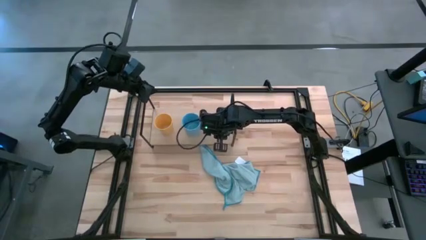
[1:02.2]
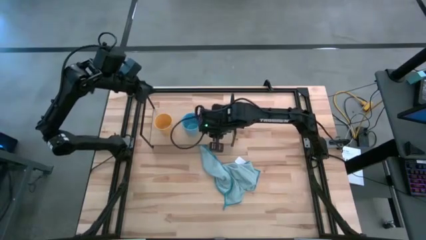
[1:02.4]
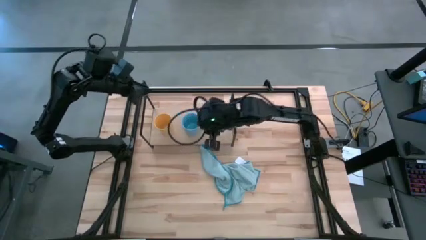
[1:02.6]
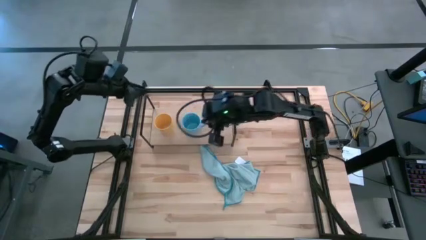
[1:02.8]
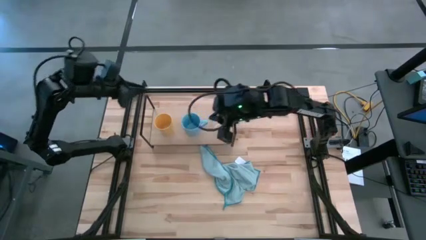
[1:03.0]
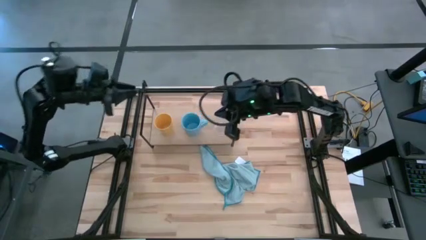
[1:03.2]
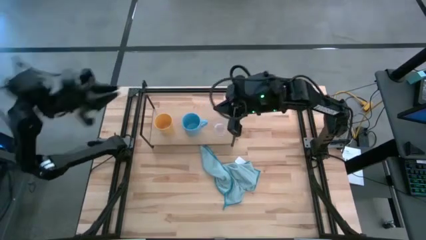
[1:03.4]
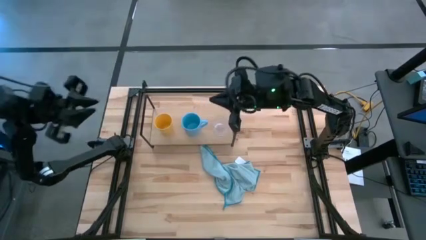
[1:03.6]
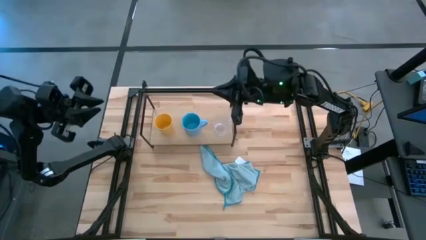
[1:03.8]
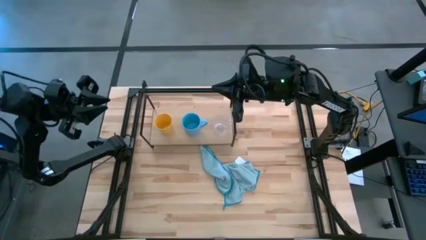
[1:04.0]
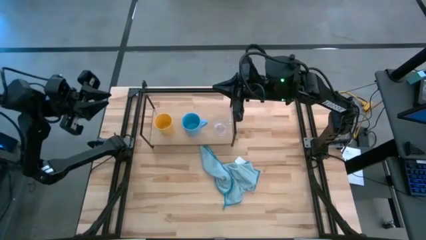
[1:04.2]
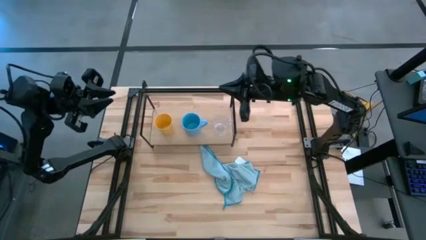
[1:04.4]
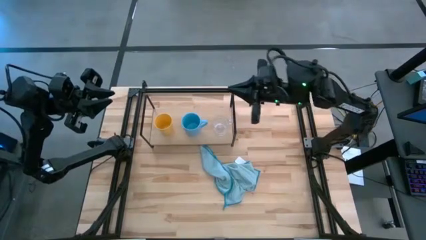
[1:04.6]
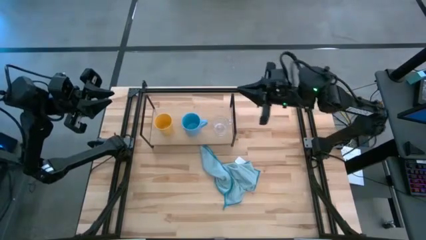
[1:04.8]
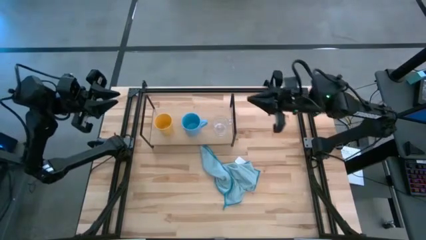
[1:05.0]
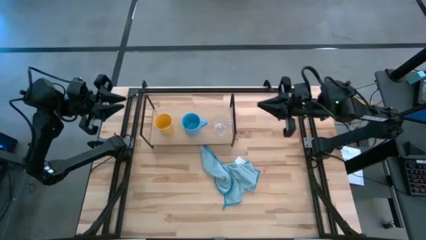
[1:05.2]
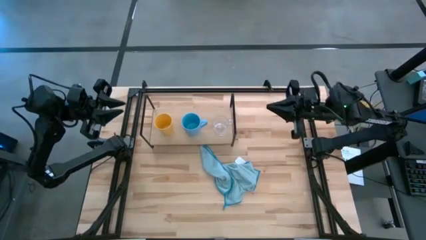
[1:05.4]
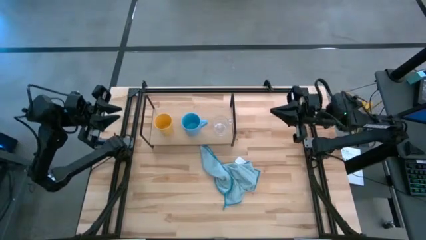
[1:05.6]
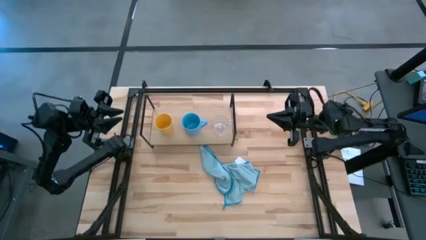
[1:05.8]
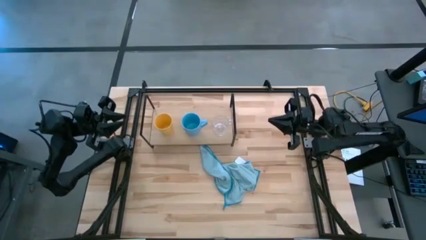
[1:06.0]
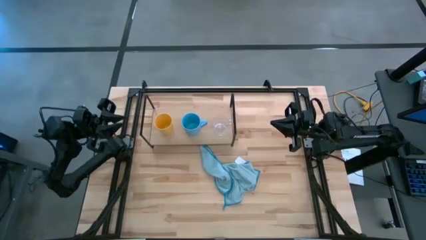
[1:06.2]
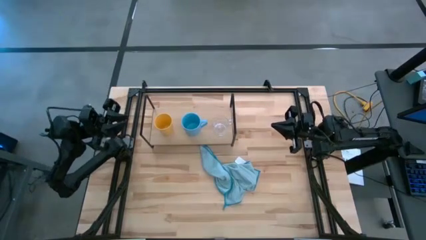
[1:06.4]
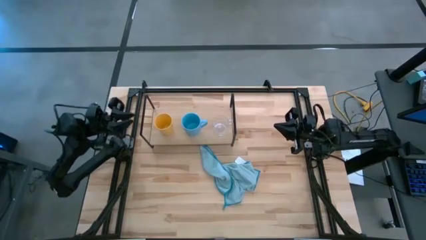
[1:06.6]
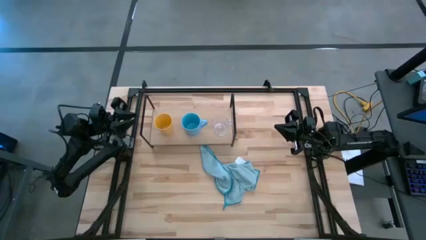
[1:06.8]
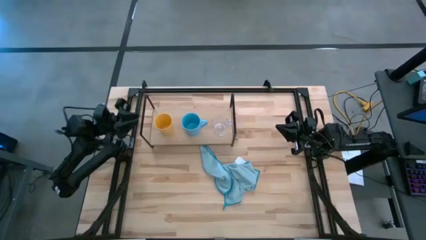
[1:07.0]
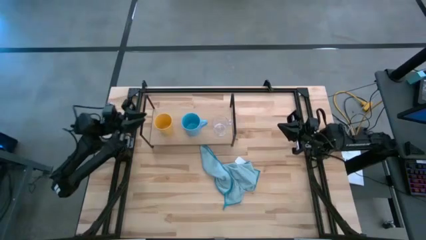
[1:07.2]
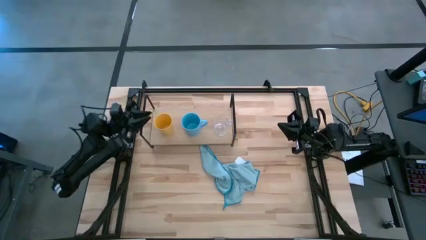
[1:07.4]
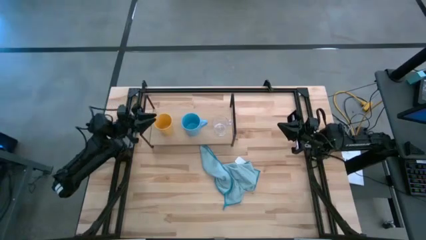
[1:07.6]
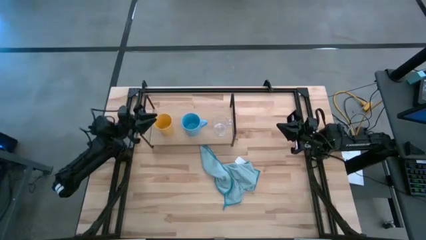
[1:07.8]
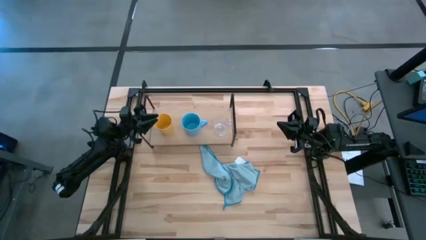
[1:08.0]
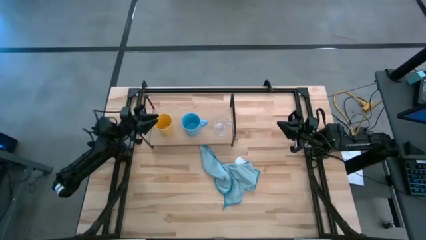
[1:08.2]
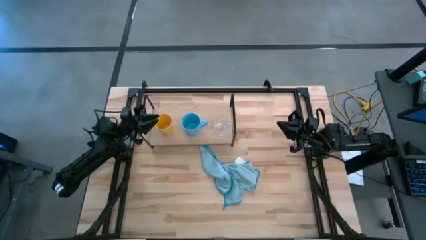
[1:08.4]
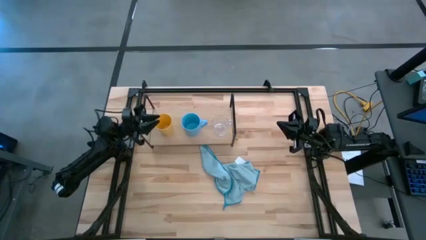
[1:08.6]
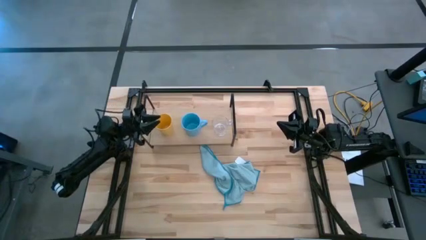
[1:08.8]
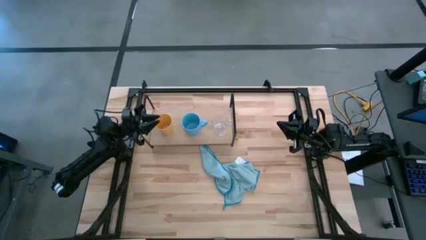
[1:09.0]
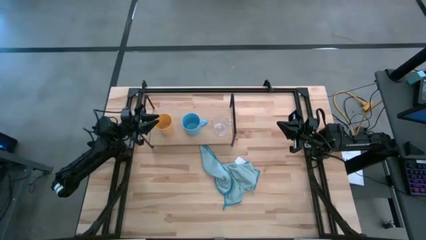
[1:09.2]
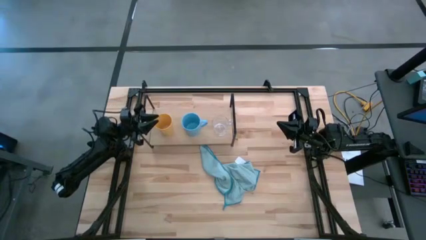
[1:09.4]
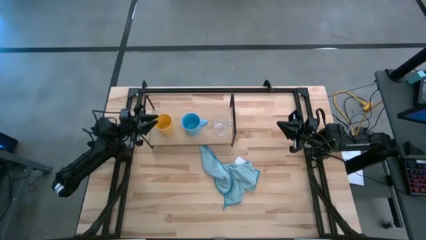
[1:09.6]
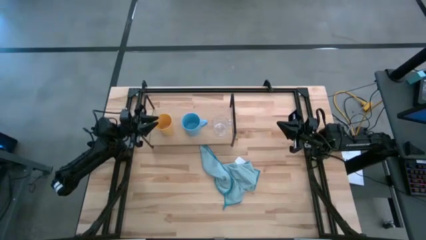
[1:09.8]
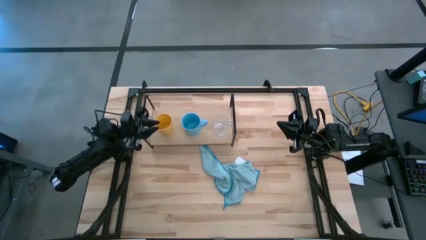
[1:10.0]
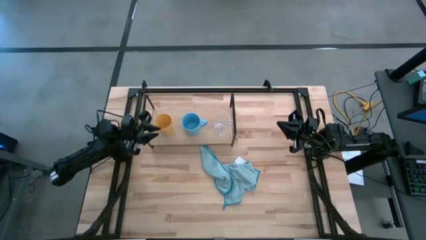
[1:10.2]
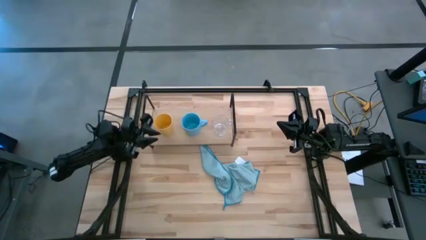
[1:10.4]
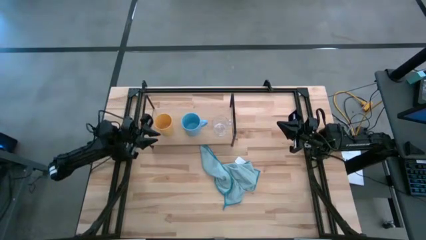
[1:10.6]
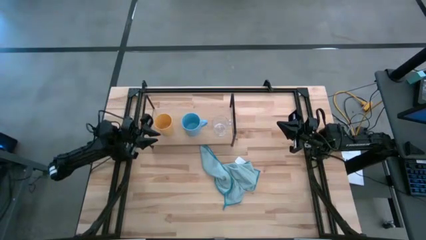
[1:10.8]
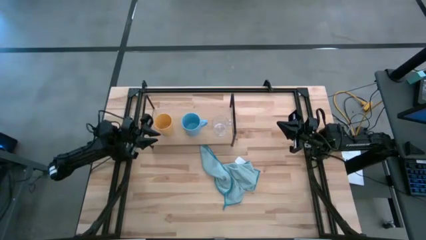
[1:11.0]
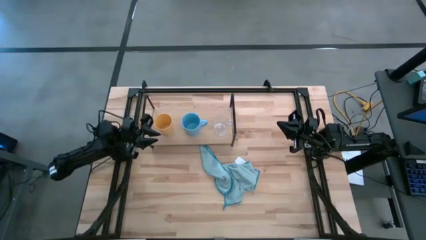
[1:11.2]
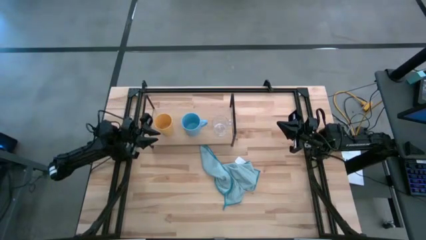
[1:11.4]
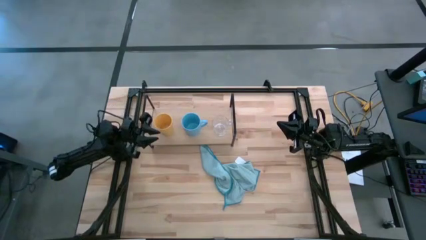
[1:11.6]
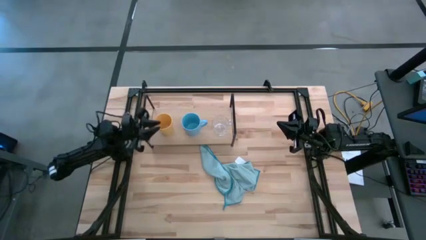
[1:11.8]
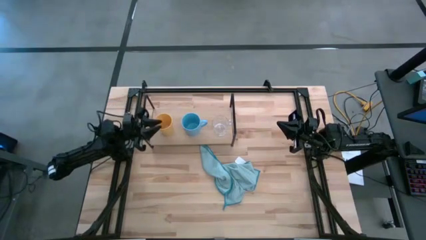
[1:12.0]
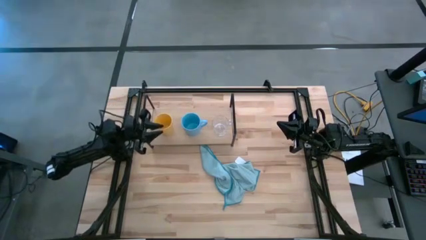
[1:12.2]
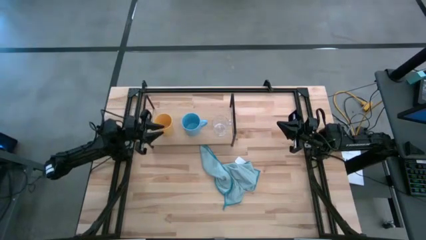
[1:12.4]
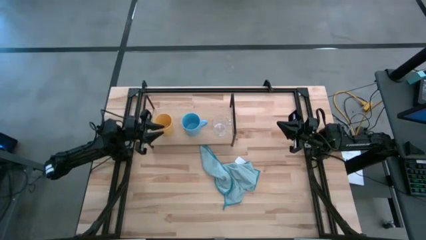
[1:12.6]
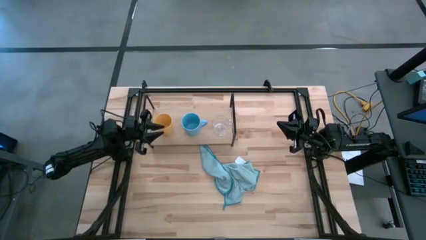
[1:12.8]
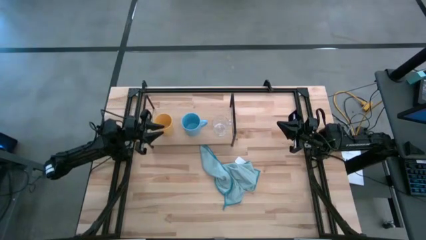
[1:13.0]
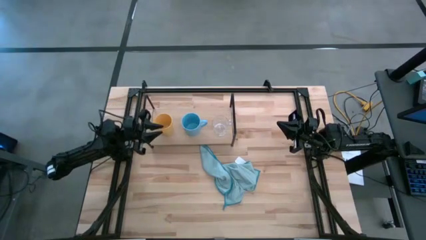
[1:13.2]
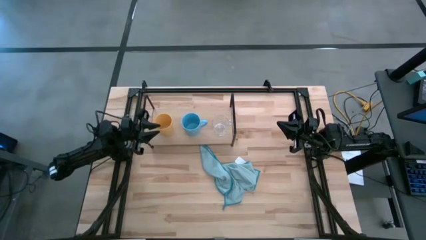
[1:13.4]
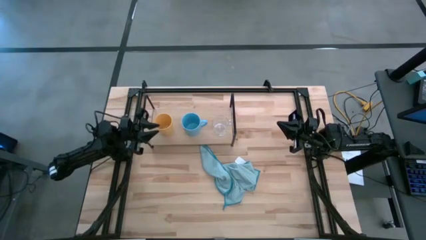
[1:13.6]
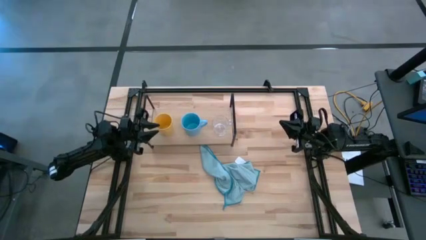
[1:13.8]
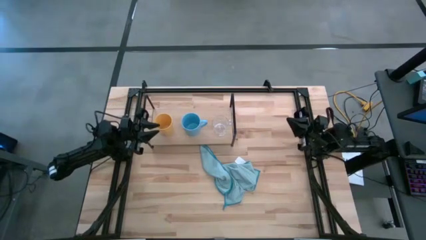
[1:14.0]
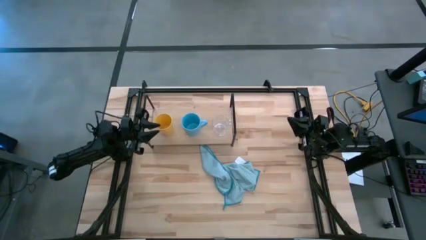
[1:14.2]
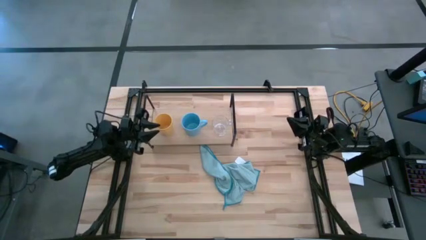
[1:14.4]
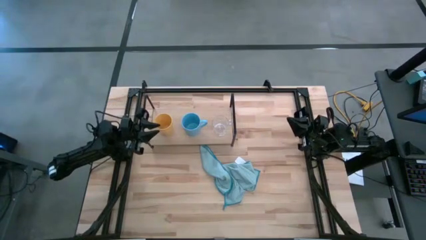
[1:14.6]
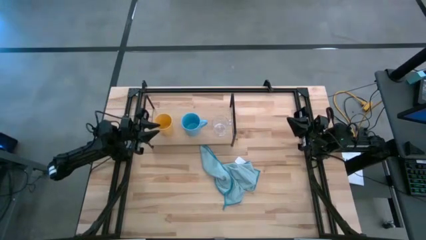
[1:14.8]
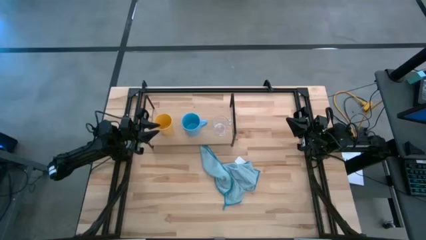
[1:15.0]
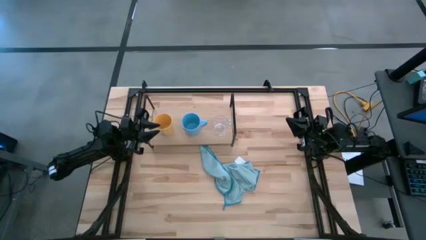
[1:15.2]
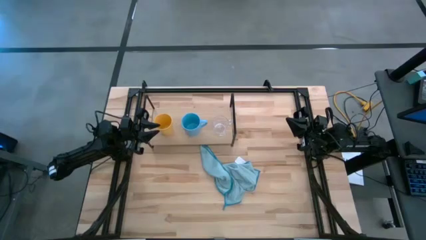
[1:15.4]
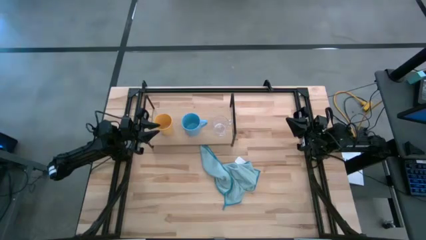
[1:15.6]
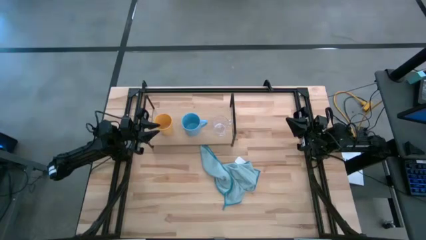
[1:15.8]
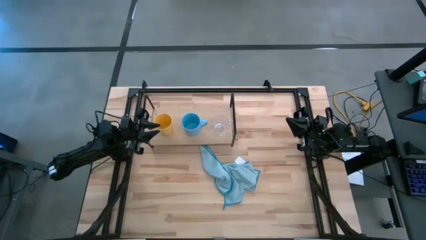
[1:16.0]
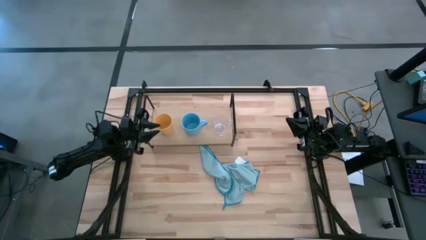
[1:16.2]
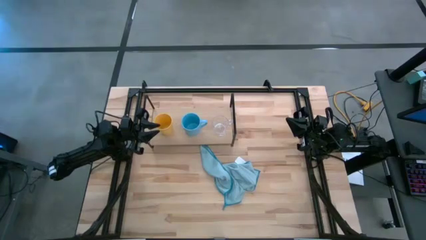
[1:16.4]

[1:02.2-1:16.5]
Task: Stack small to large cups/mugs on shelf
Return to Home Position
